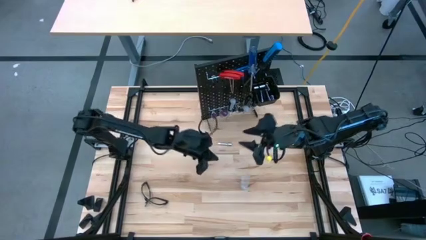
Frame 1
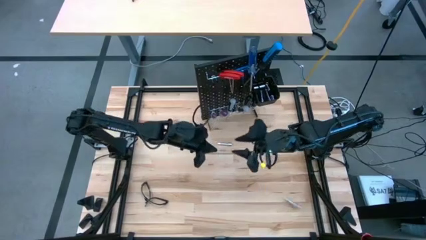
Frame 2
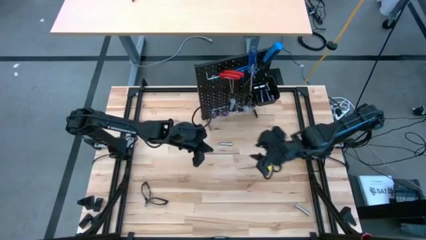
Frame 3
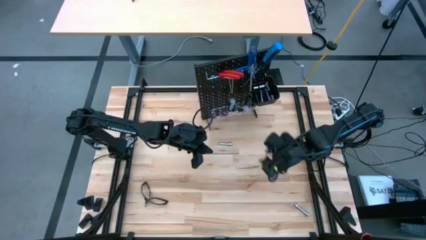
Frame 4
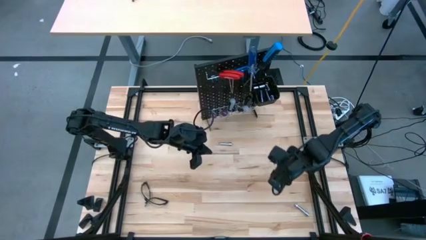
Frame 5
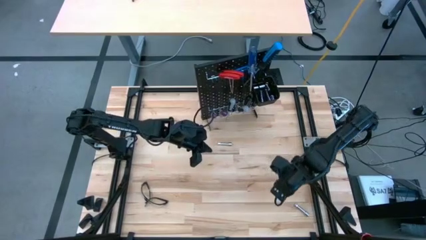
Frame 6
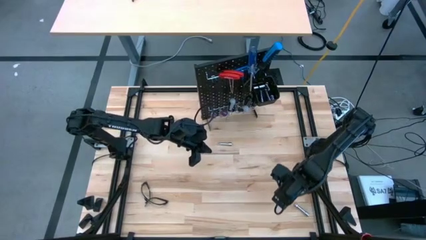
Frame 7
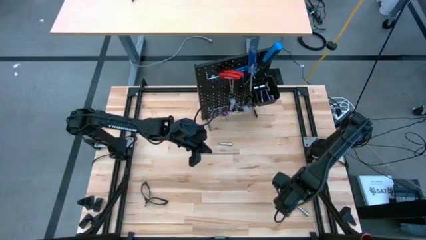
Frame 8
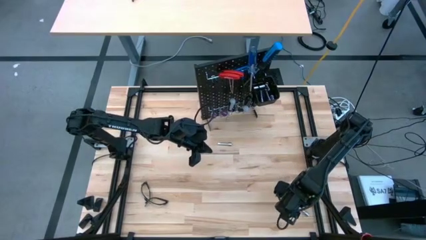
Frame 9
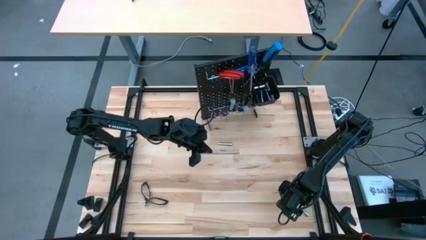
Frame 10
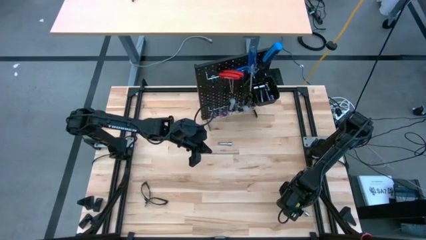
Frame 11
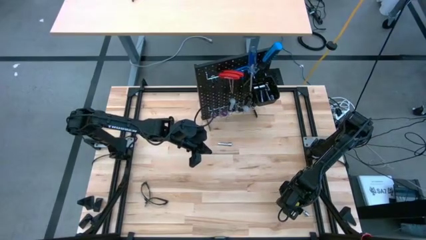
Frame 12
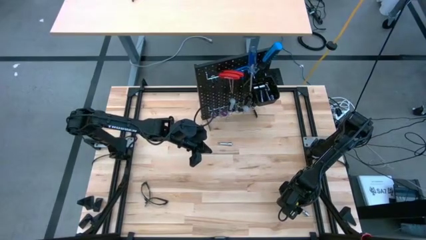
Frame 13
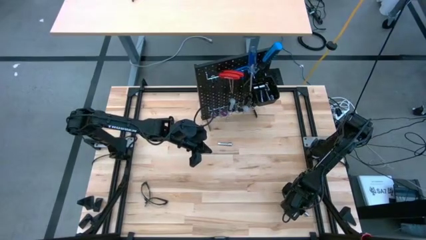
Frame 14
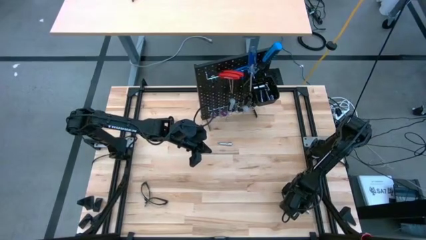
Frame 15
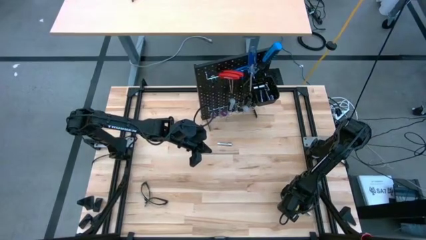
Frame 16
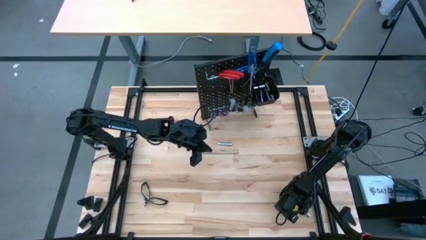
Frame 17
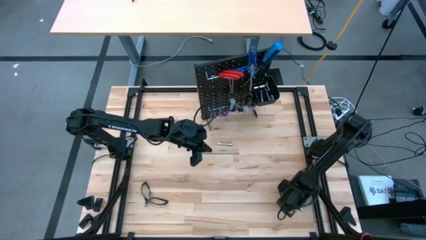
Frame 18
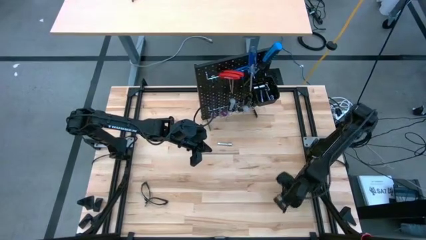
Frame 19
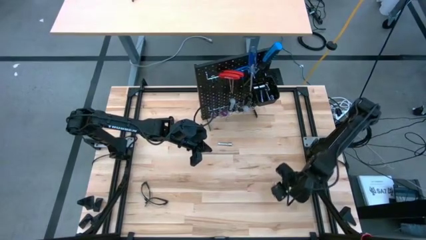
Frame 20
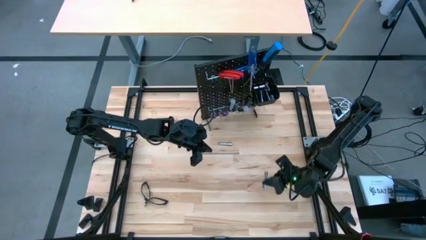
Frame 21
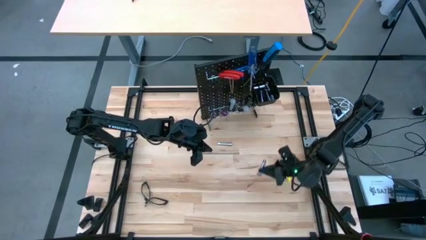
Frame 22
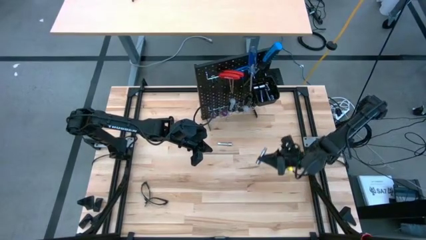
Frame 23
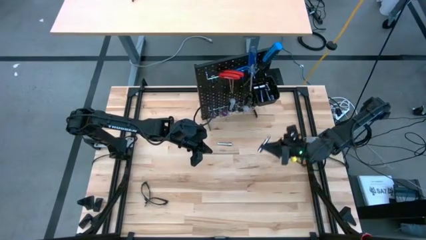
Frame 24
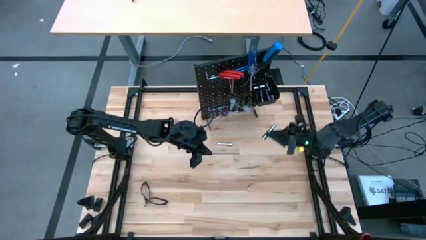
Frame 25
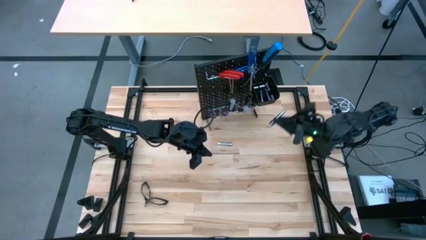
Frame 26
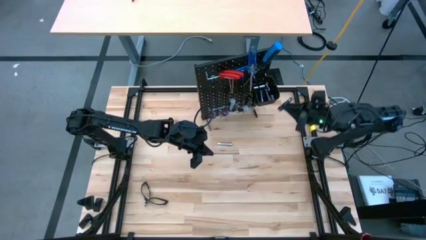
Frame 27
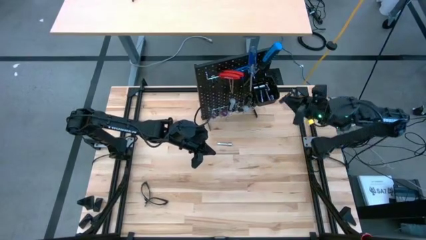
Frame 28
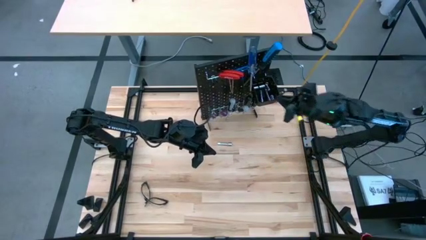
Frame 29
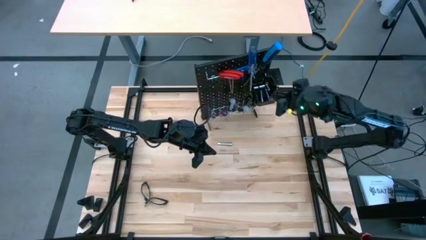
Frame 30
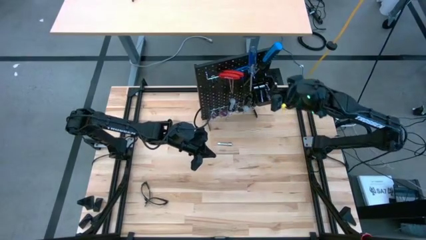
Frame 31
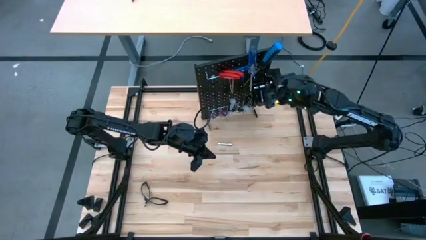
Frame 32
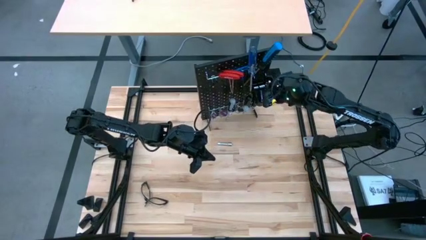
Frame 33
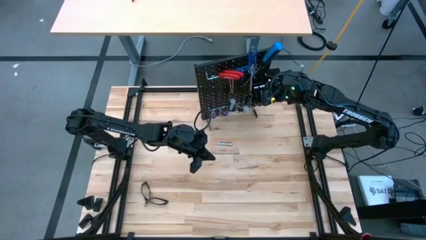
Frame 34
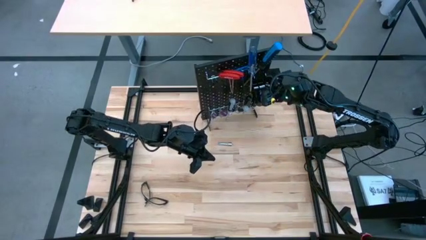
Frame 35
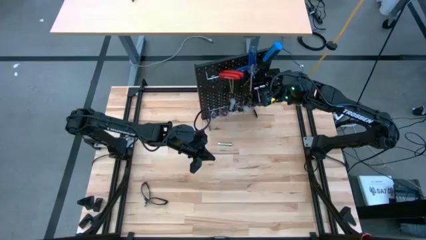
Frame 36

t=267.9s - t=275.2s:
Task: Hang tools onto peg board
Put the silver extension bar into the black bin on the pegboard

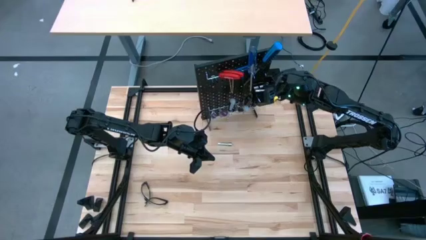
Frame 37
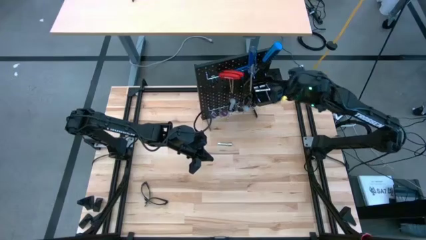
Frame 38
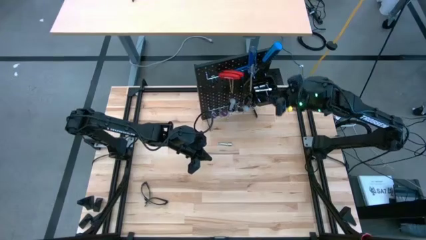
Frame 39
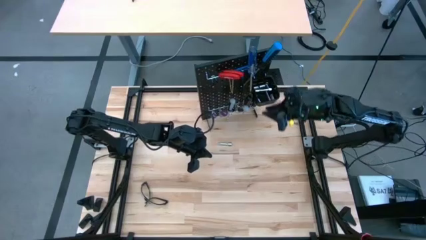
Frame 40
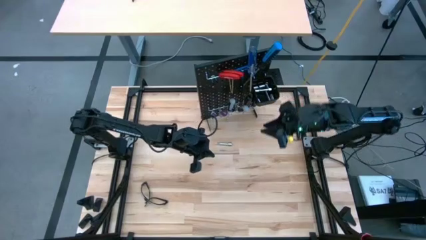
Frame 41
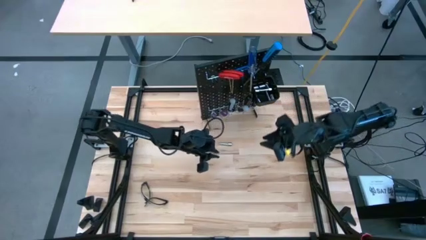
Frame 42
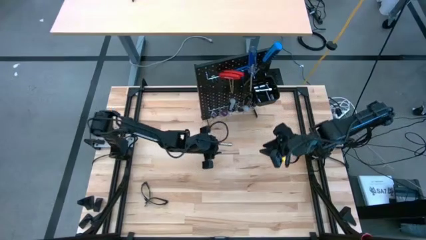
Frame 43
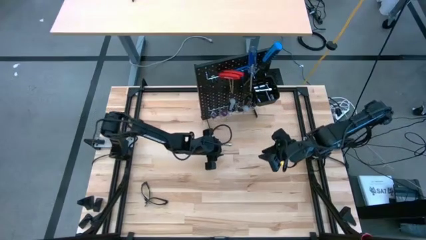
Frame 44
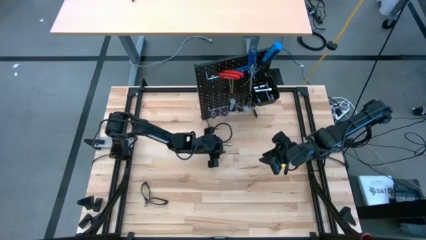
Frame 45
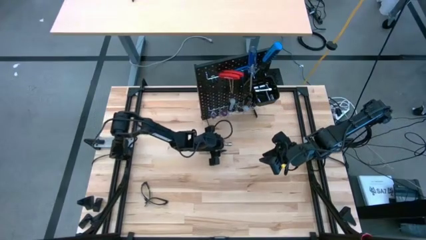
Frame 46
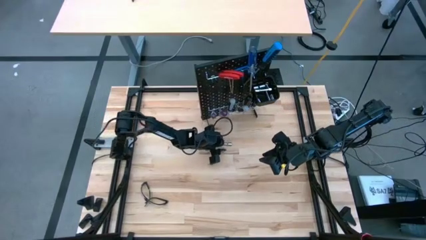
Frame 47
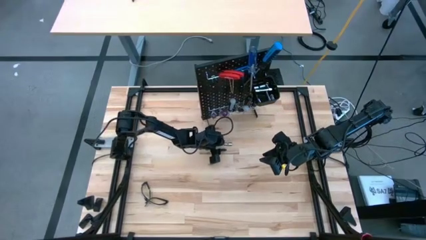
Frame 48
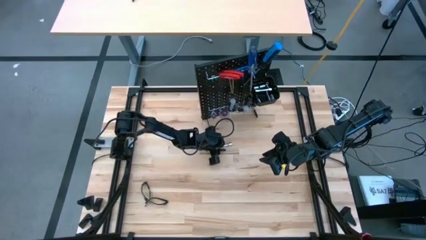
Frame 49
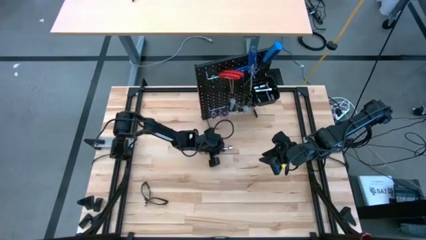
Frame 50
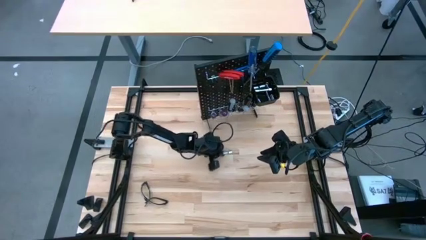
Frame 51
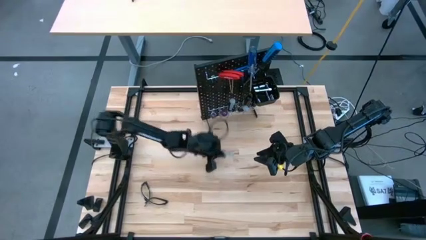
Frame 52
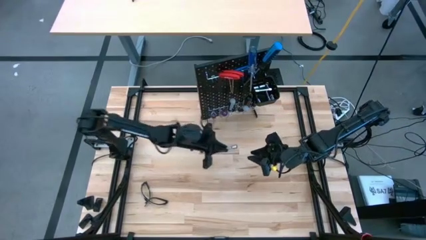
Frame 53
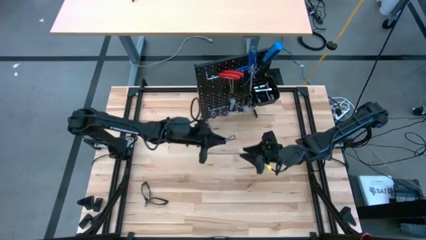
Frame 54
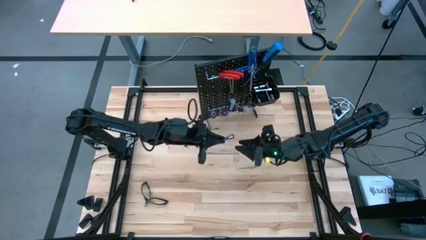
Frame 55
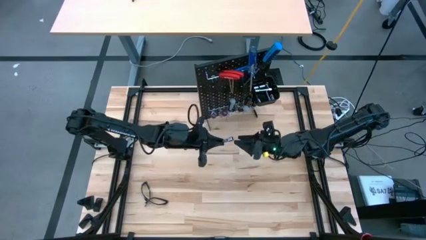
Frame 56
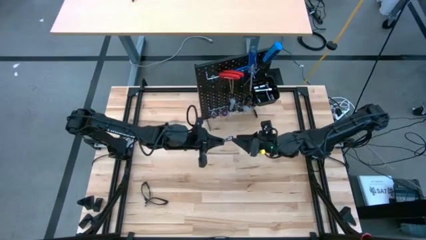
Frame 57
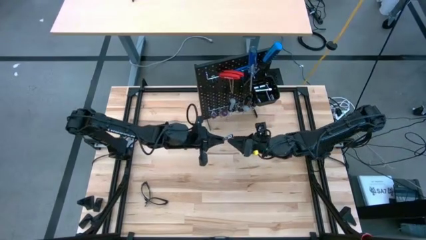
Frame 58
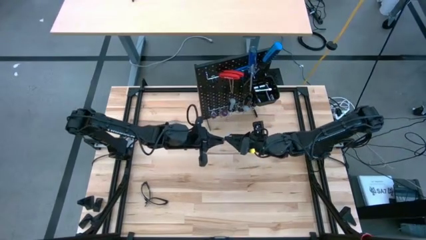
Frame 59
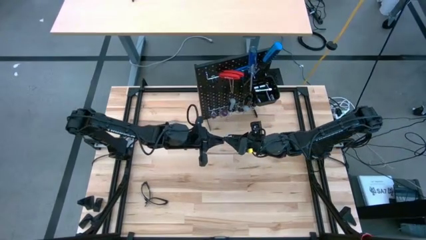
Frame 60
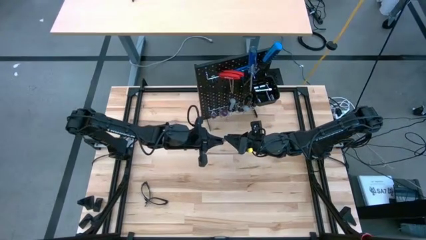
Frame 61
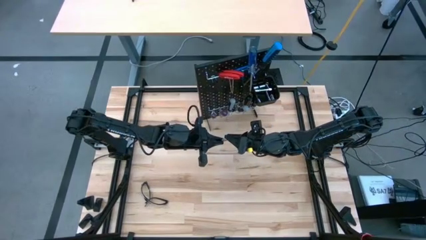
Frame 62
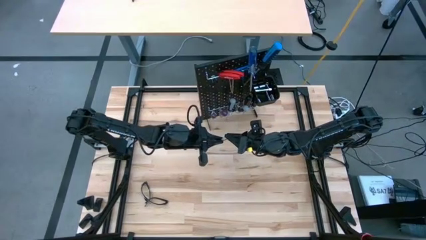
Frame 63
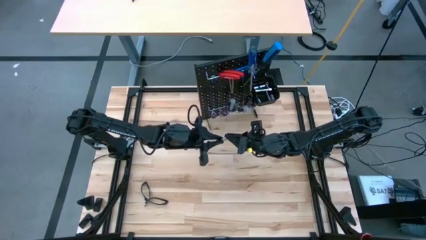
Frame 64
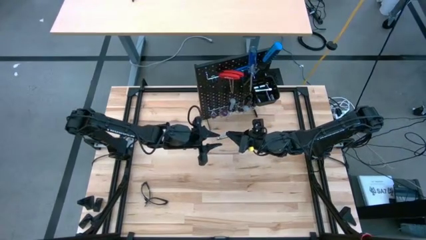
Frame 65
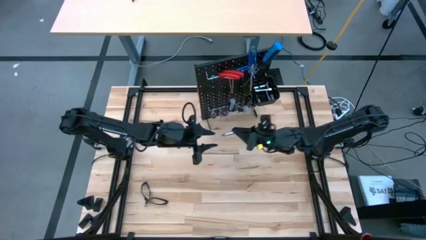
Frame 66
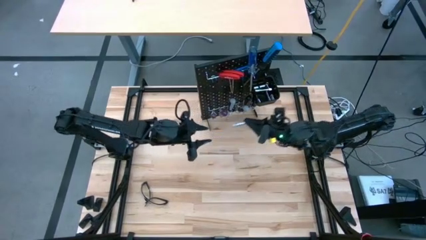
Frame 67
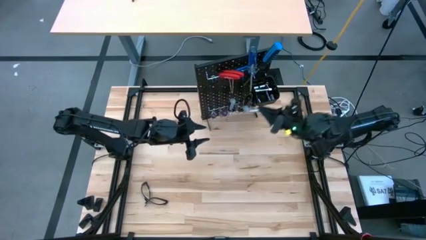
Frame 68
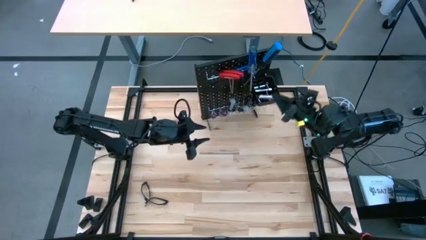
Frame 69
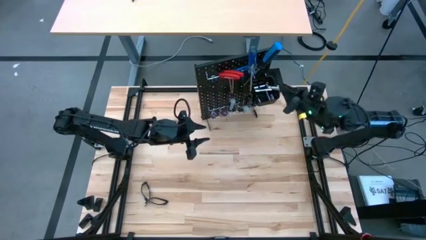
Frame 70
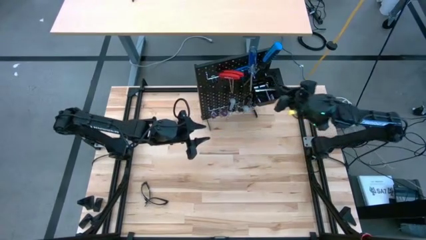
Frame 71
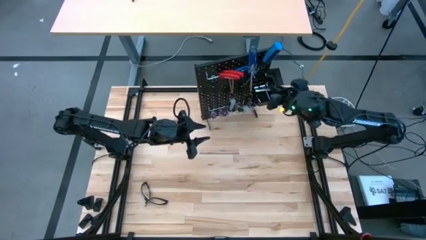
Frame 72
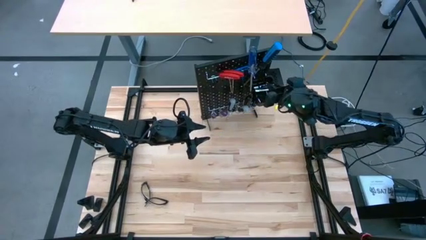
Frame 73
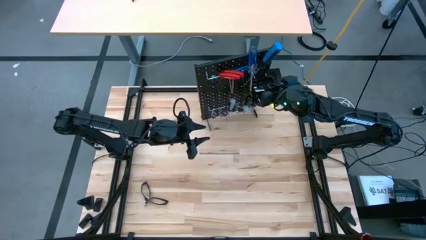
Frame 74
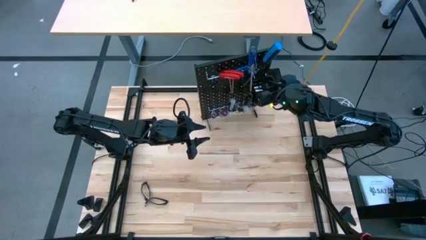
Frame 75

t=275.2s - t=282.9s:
Put the silver extension bar into the black bin on the pegboard

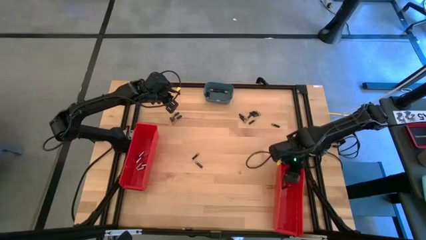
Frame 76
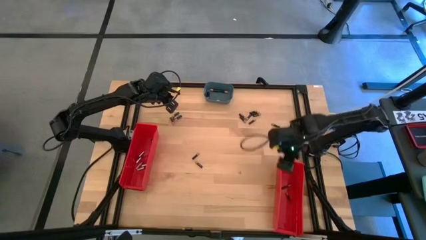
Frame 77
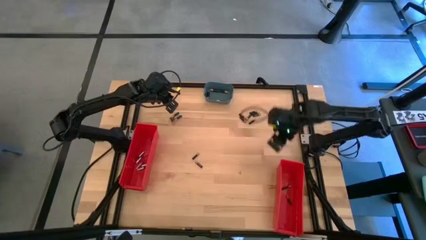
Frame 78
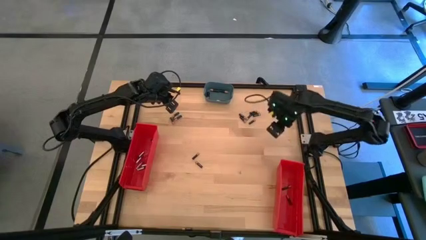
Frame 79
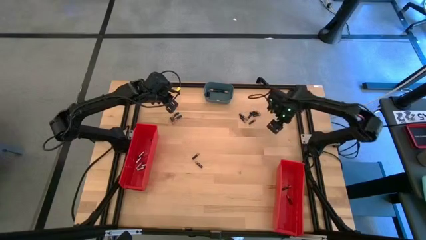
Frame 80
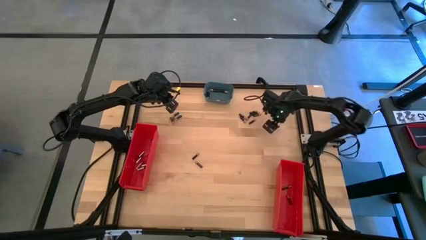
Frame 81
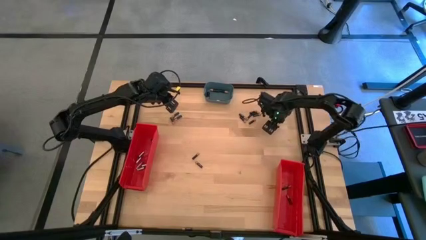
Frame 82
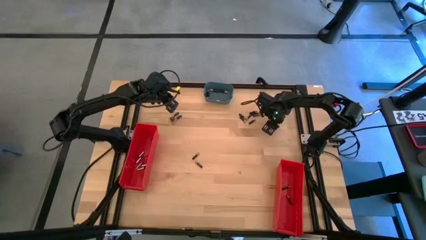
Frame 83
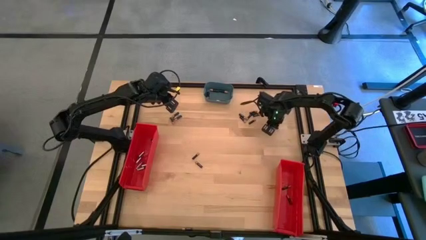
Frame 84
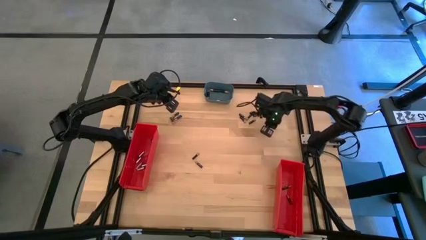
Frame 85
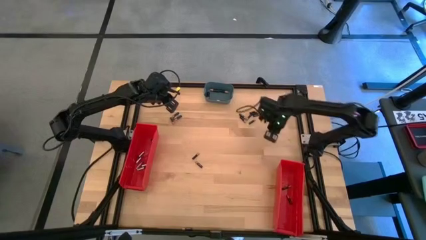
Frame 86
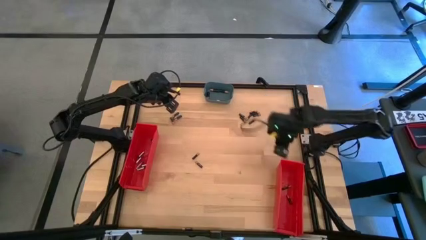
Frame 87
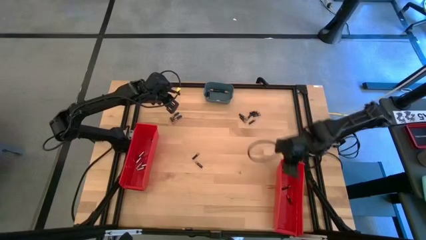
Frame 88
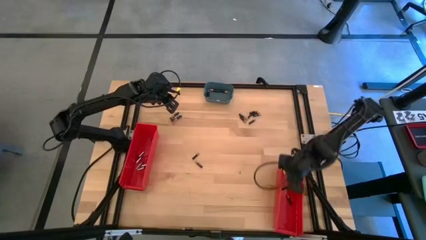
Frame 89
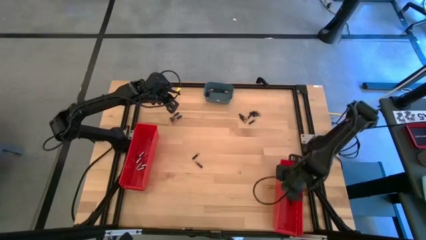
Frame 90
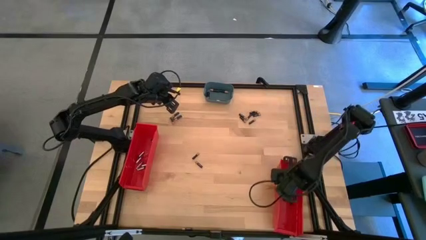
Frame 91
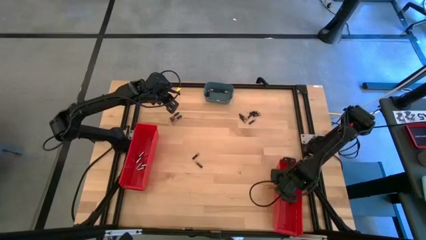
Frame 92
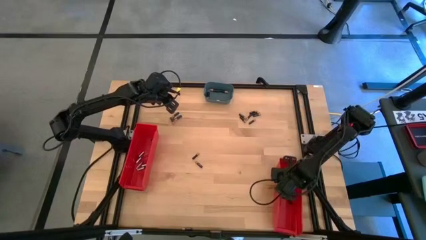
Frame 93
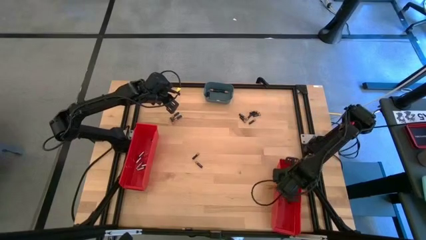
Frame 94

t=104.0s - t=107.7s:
Task: Sort batteries
Put the small brown battery into the right red bin
